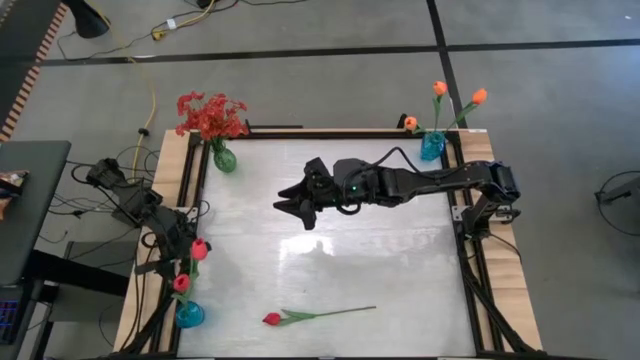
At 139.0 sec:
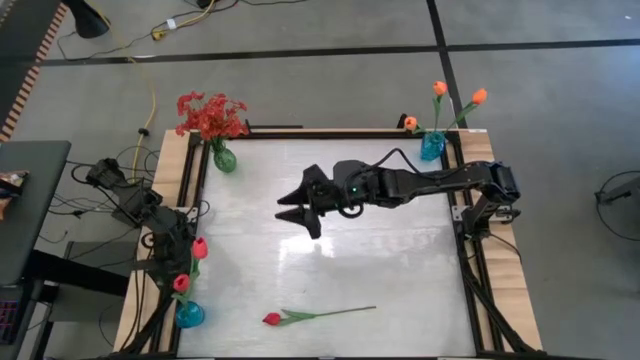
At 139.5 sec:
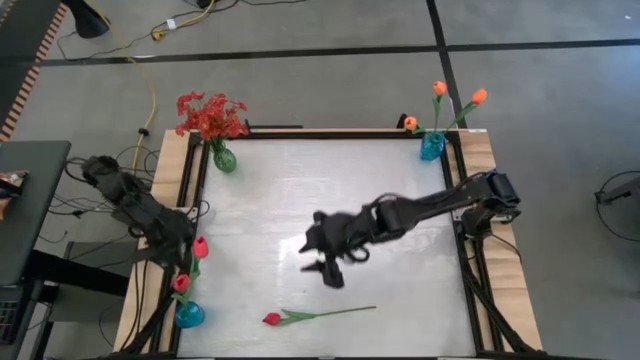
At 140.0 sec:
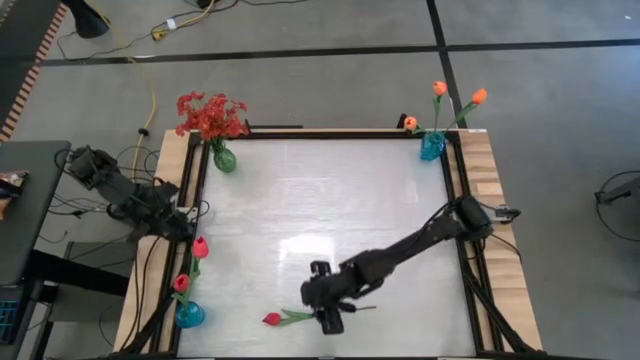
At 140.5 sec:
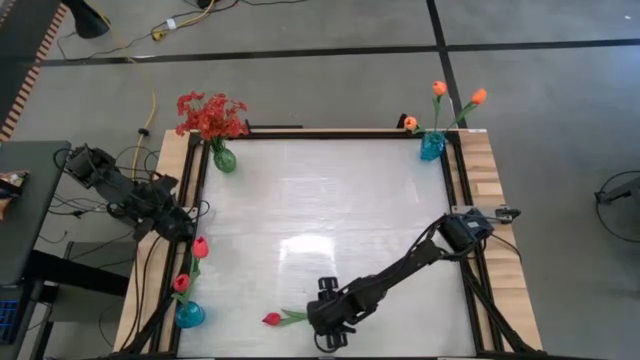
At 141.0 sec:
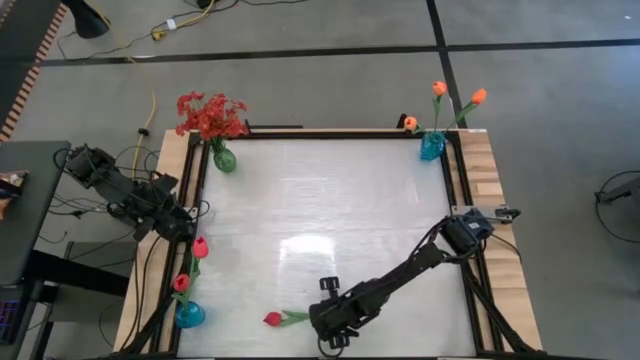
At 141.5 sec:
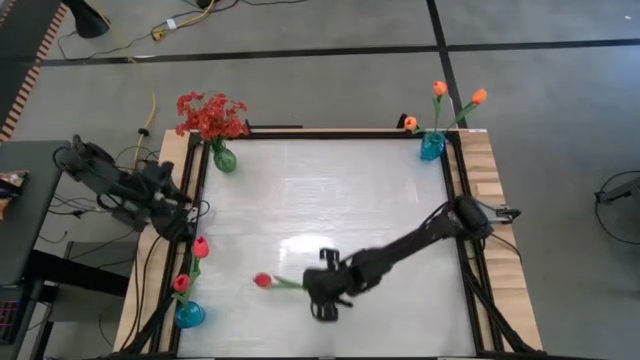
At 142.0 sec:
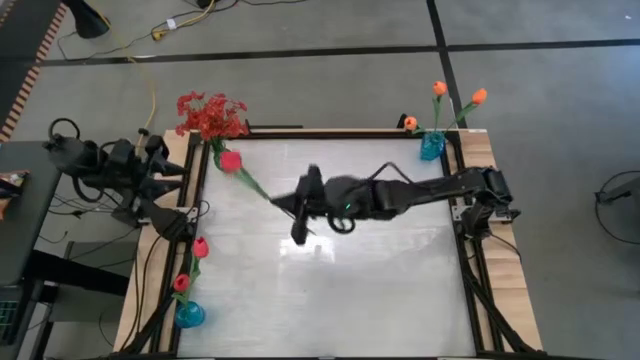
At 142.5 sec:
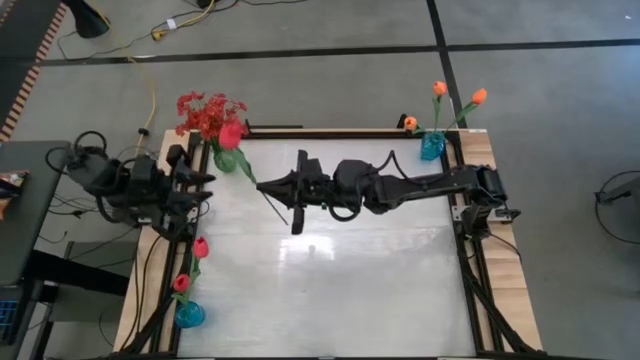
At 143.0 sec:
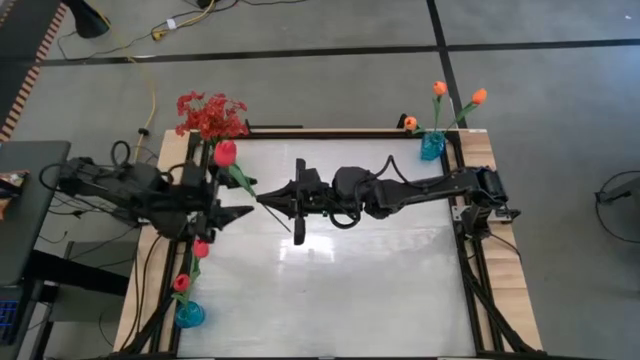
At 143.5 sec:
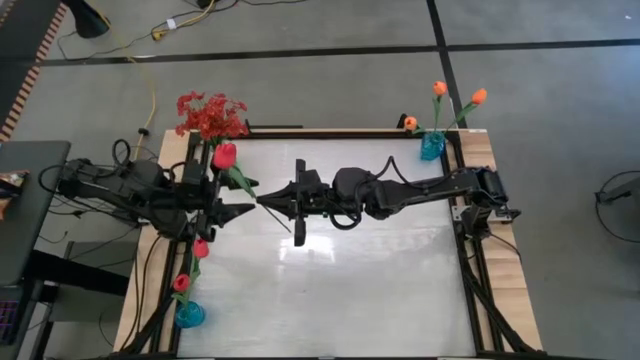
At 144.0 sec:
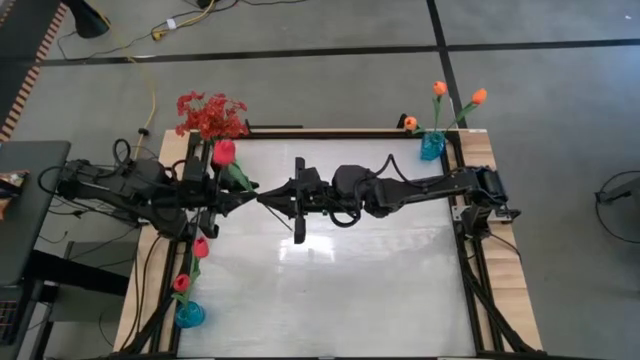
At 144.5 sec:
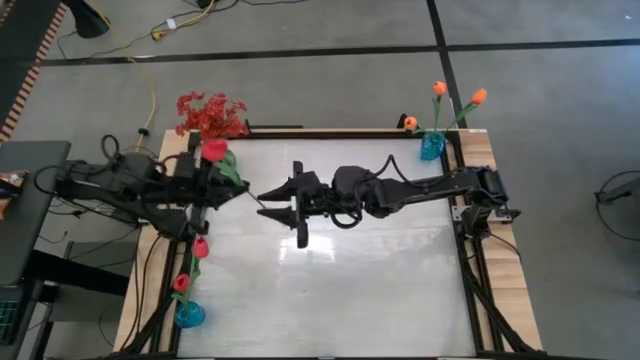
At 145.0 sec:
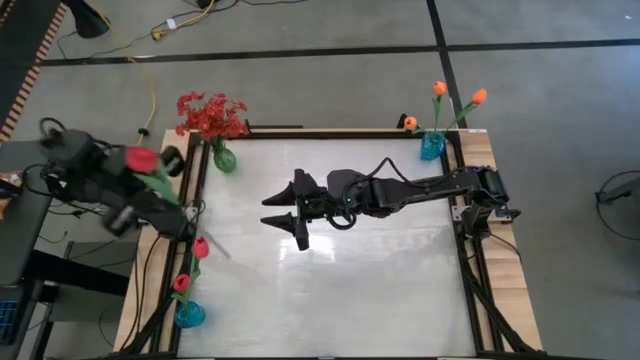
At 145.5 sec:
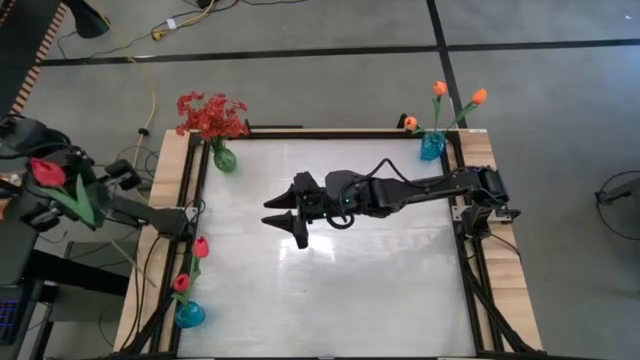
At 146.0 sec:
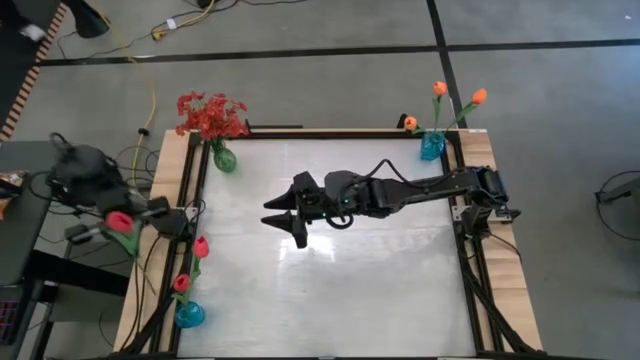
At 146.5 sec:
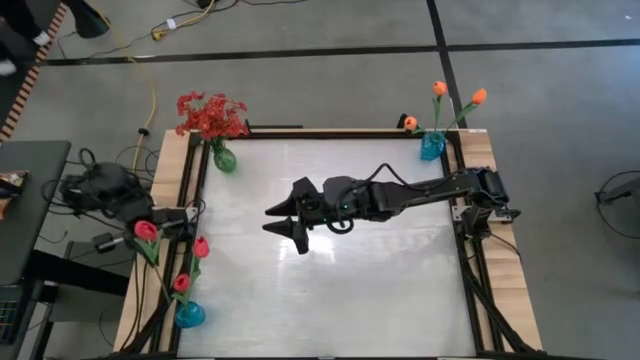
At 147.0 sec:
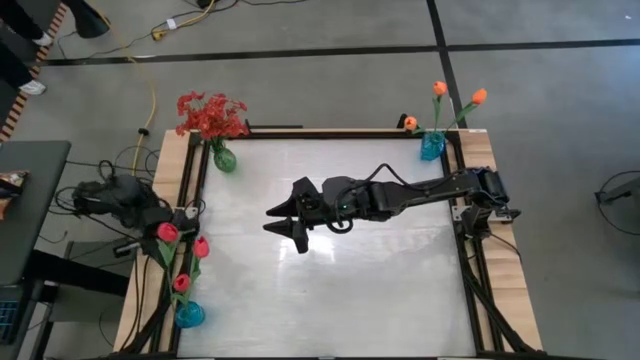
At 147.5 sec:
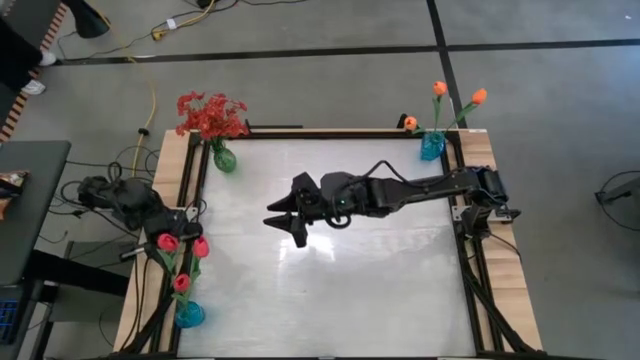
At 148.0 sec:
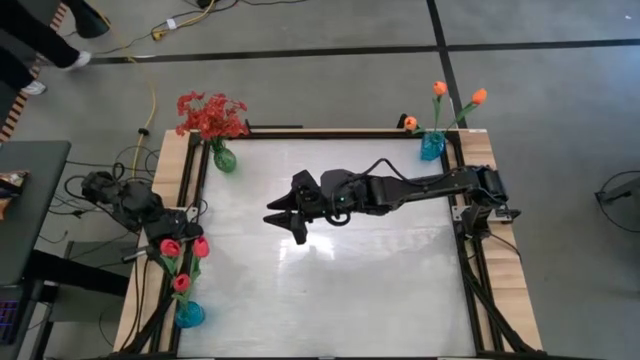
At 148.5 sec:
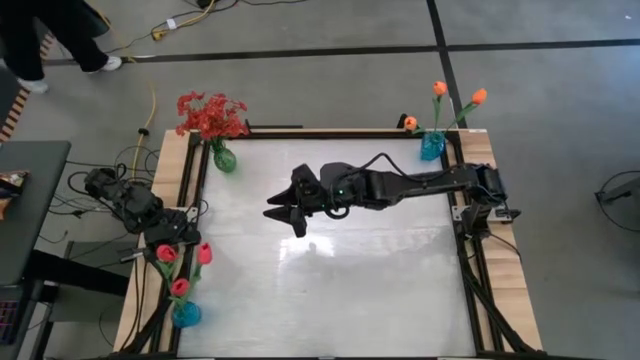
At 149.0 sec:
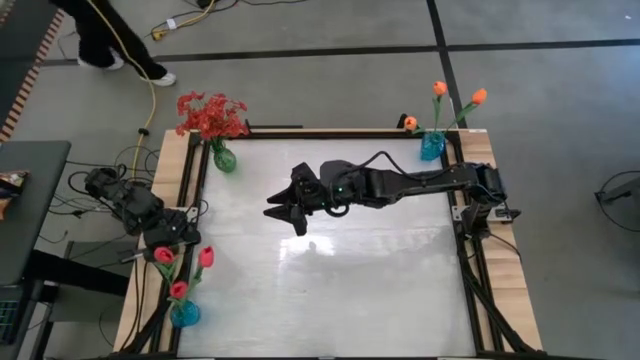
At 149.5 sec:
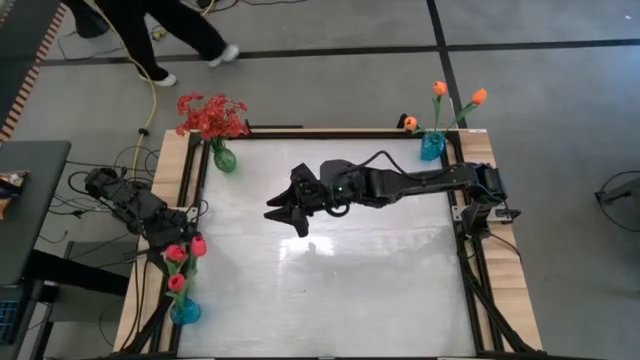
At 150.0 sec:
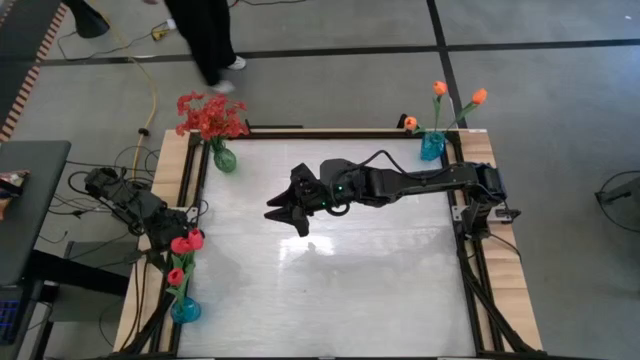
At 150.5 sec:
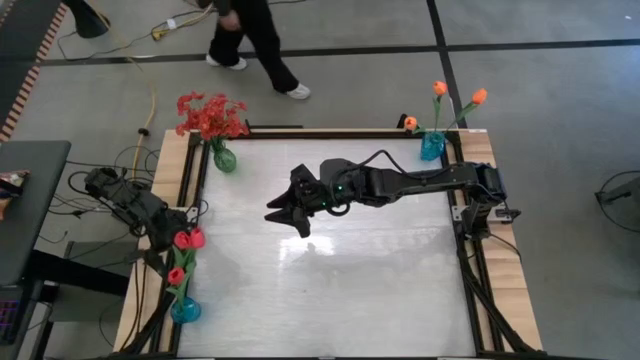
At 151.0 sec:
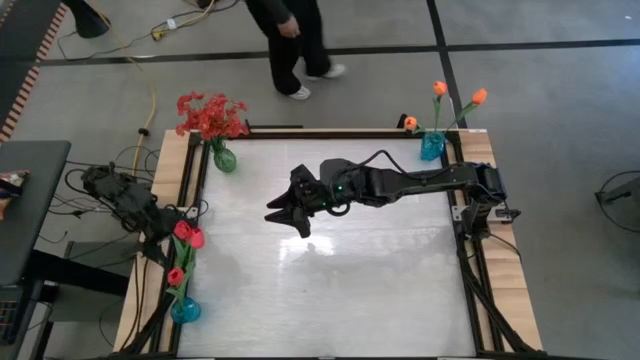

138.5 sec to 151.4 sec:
Task: Sort flowers into vase by color
Put the pink tulip into the bottom blue vase

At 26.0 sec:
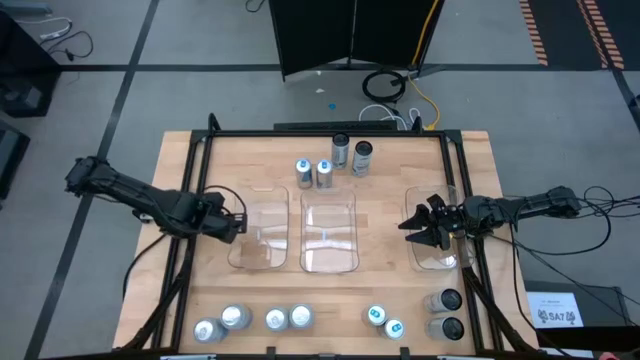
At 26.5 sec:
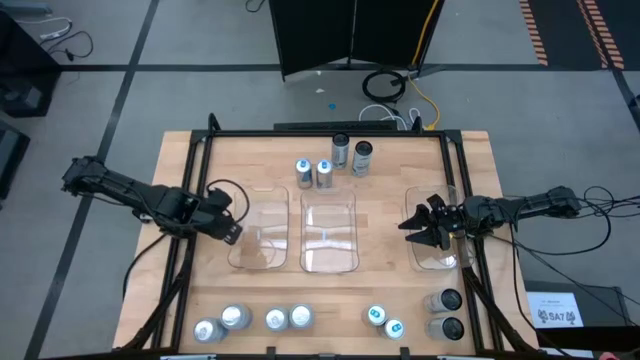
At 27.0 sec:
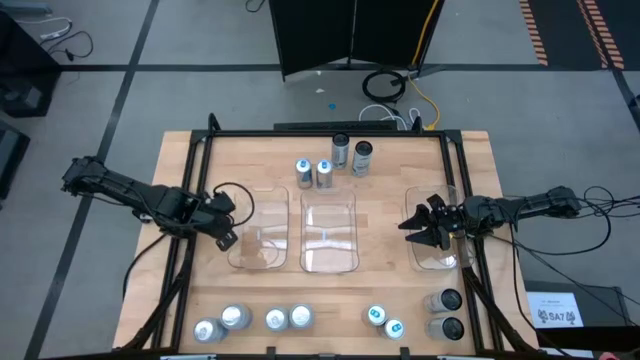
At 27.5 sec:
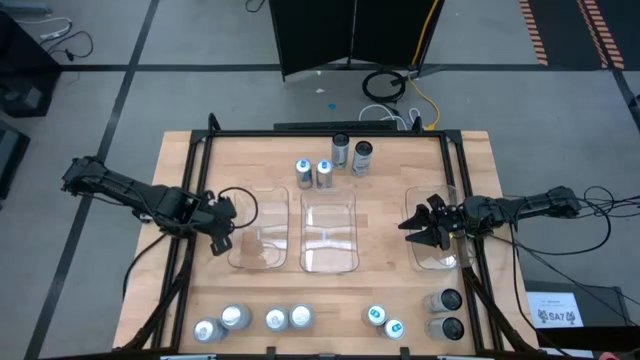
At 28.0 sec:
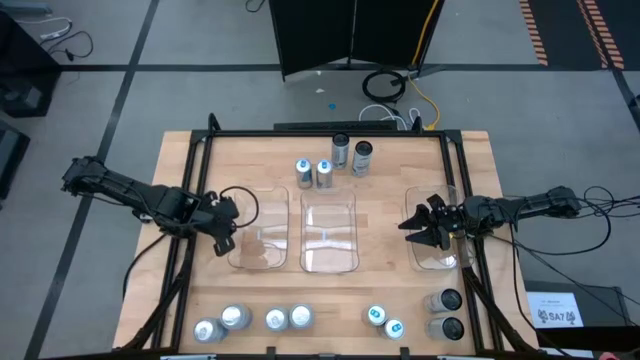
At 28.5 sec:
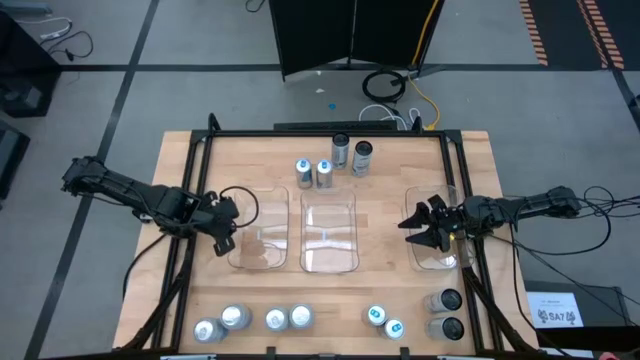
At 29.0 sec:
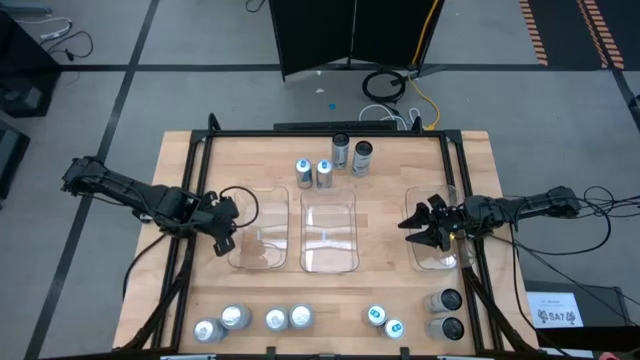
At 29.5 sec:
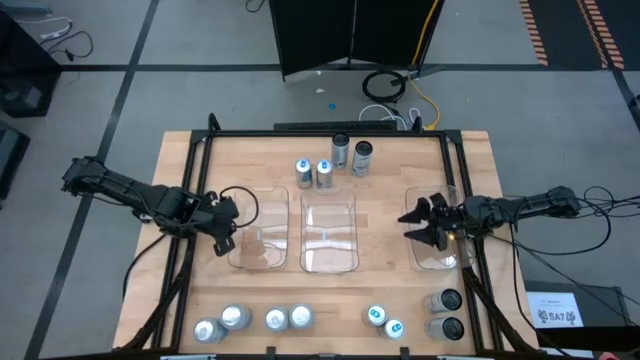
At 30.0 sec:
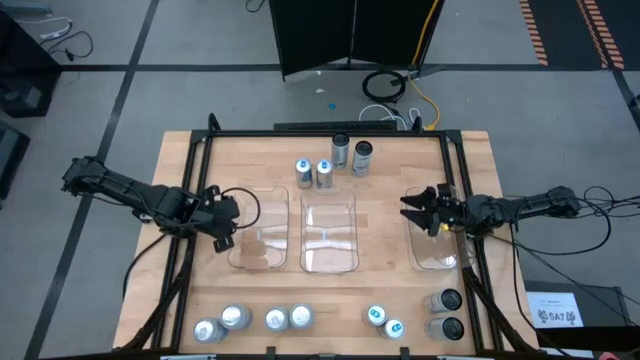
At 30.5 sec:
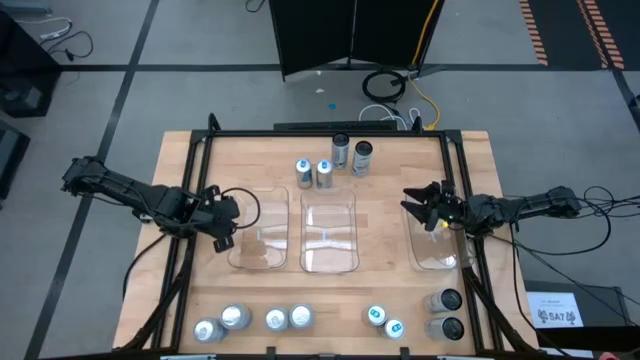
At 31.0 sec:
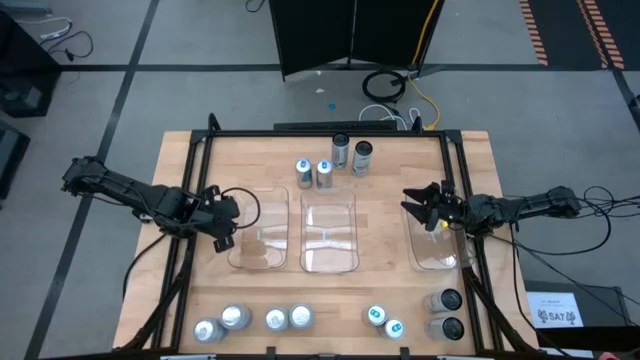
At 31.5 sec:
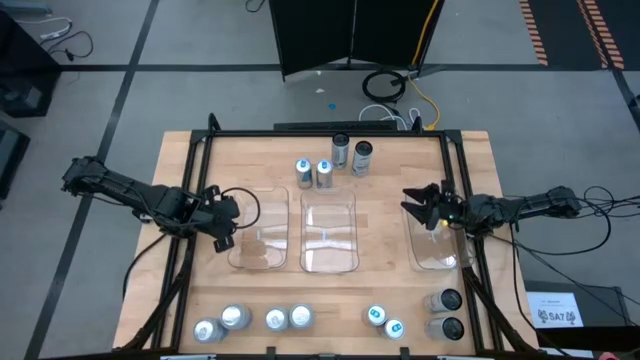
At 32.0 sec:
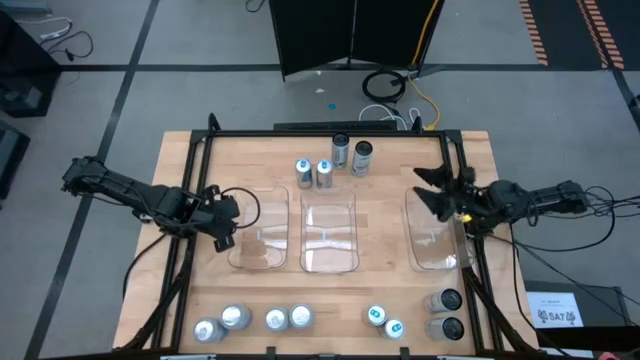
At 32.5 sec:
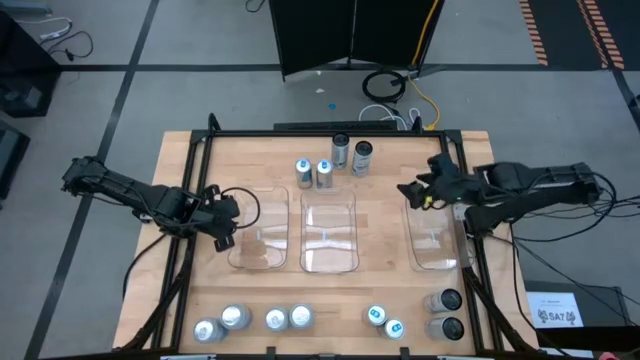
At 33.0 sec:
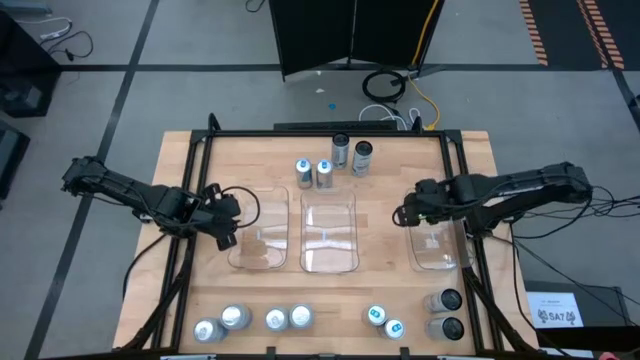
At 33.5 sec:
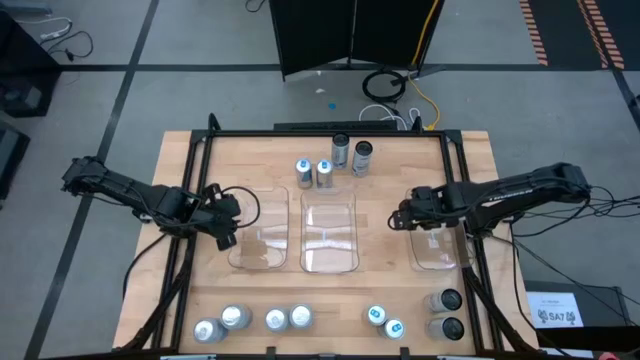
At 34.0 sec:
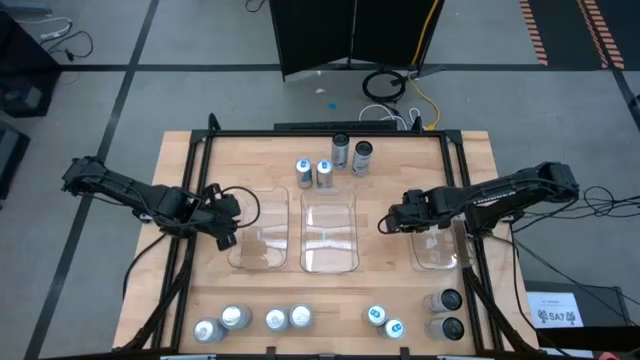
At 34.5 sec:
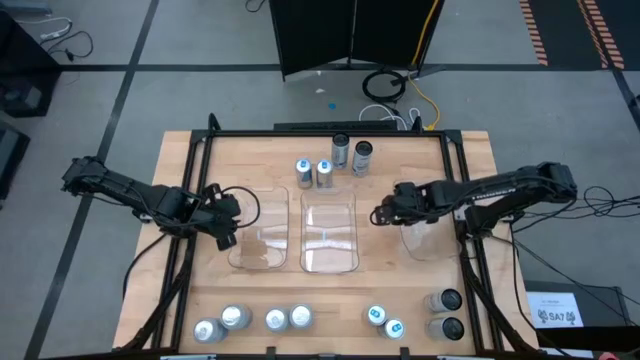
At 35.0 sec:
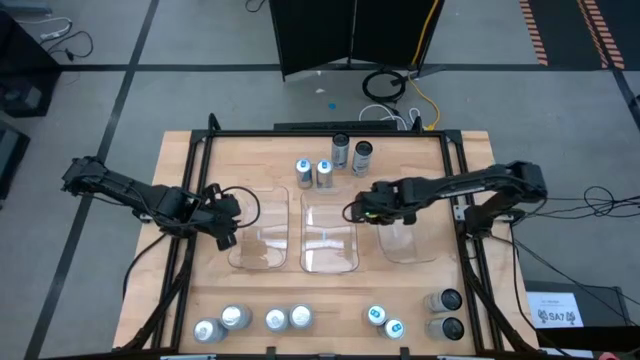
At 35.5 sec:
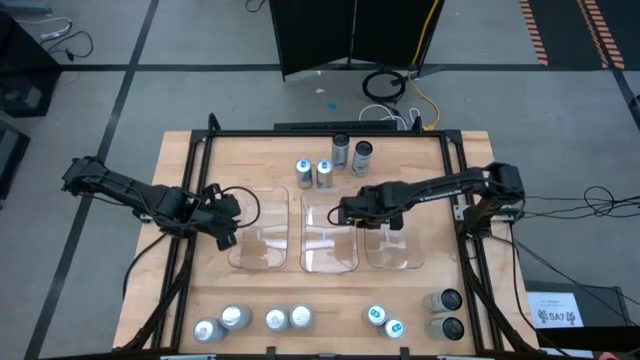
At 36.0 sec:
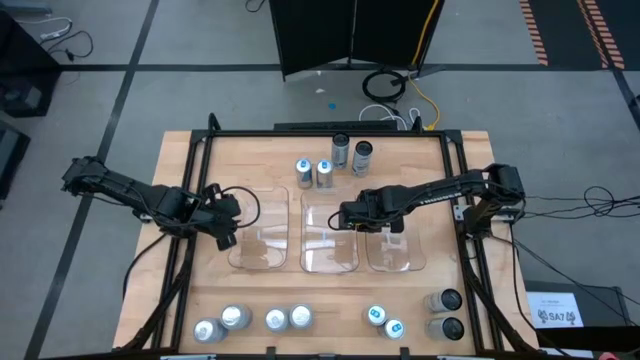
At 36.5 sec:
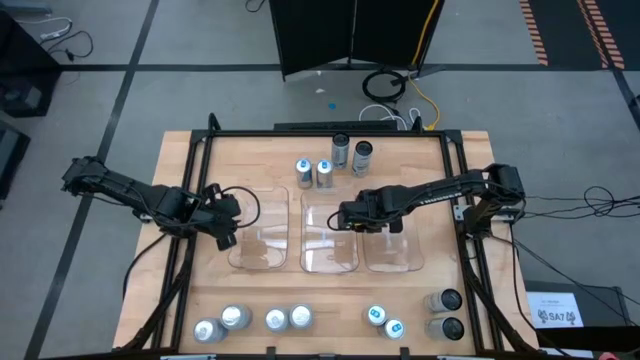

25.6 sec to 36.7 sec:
Task: Sort soda cans
Move the right transparent bin beside the middle transparent bin
